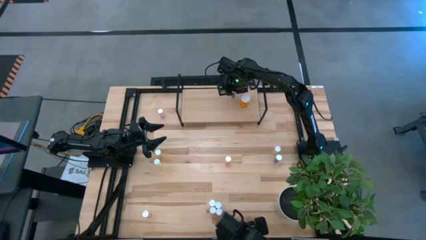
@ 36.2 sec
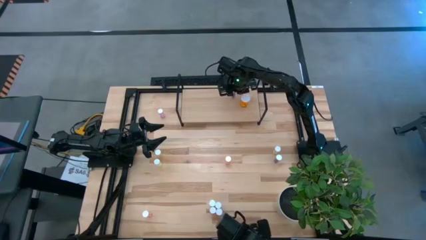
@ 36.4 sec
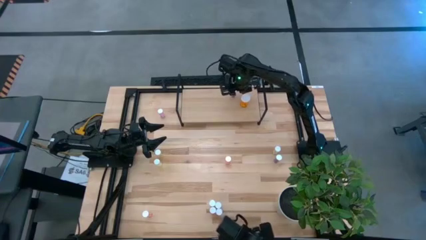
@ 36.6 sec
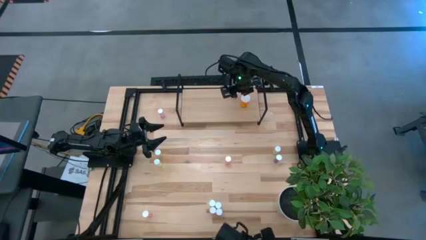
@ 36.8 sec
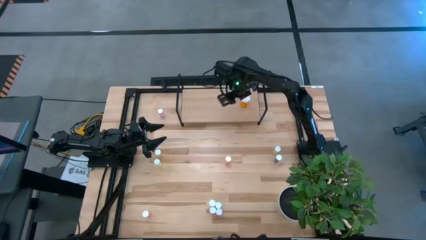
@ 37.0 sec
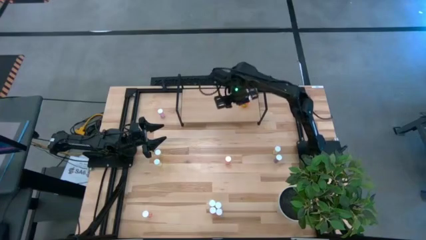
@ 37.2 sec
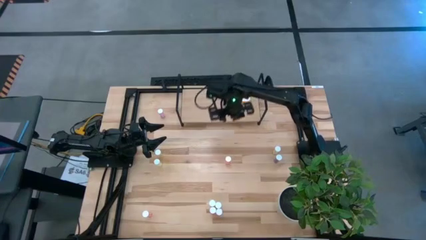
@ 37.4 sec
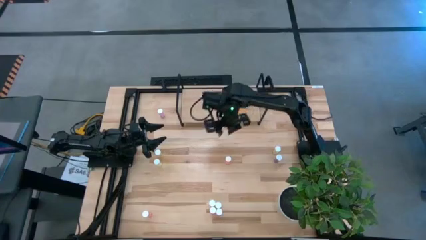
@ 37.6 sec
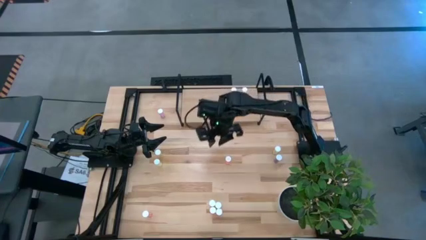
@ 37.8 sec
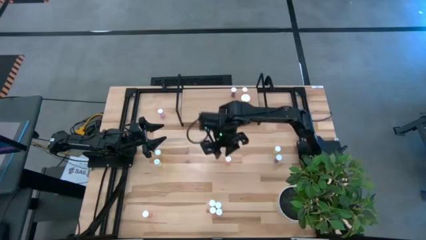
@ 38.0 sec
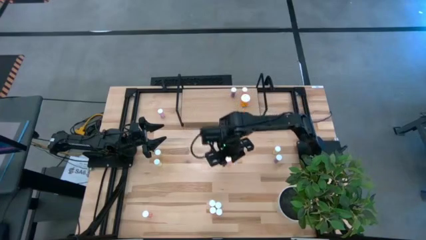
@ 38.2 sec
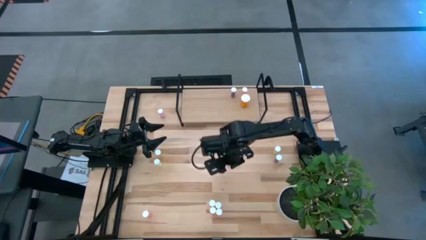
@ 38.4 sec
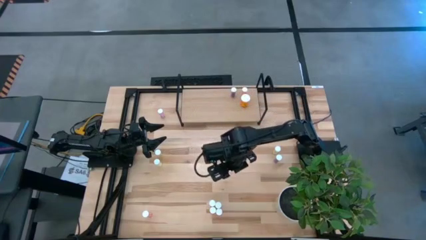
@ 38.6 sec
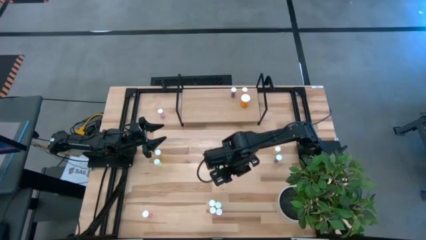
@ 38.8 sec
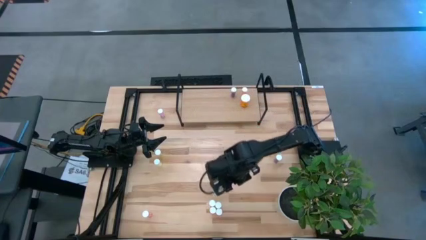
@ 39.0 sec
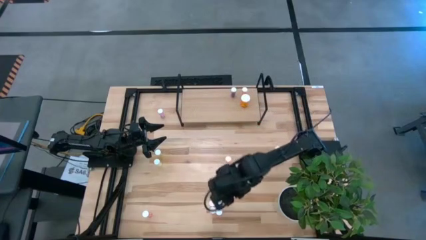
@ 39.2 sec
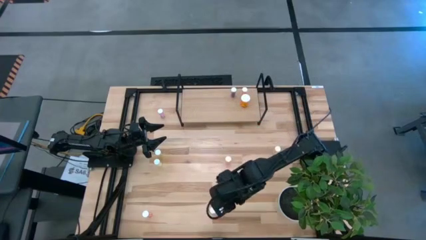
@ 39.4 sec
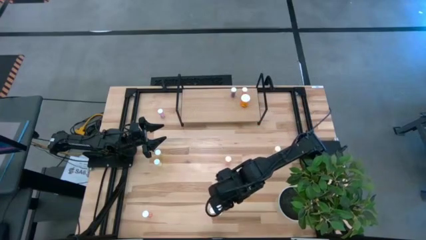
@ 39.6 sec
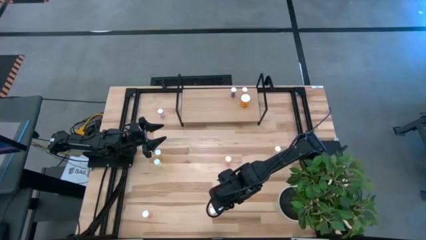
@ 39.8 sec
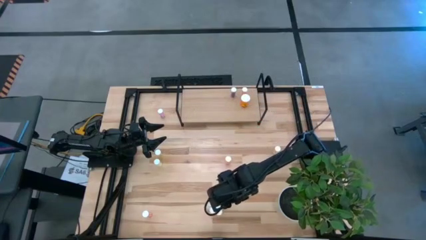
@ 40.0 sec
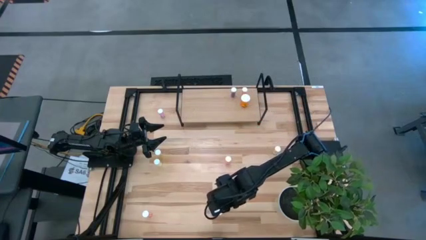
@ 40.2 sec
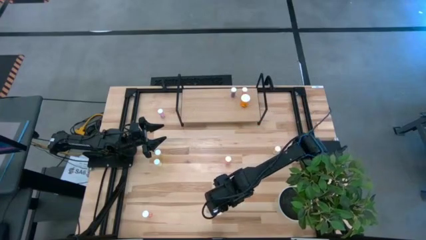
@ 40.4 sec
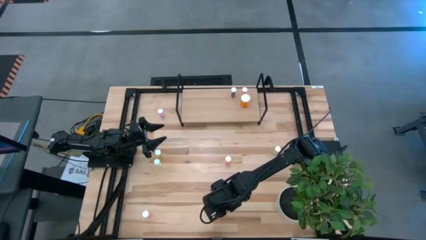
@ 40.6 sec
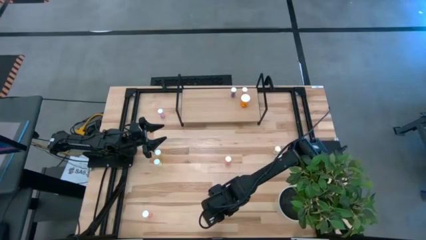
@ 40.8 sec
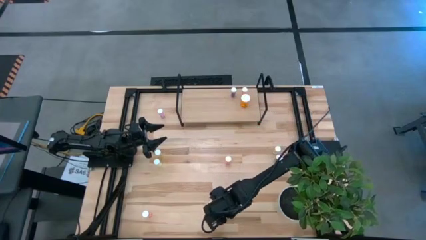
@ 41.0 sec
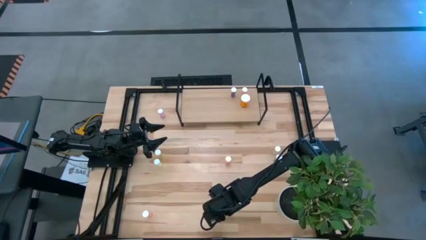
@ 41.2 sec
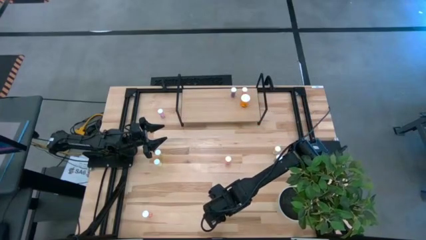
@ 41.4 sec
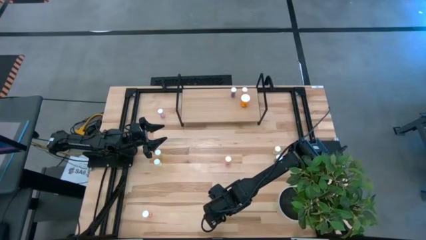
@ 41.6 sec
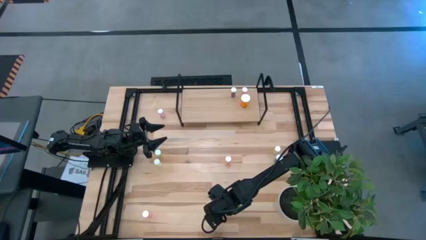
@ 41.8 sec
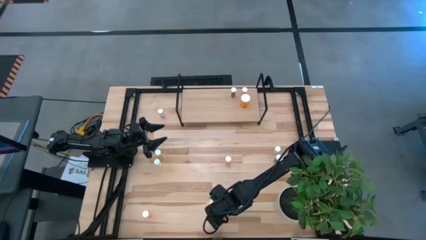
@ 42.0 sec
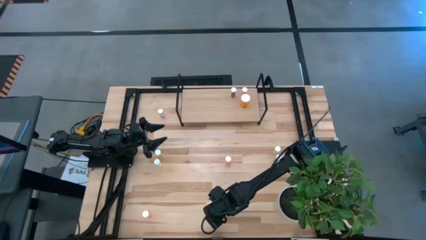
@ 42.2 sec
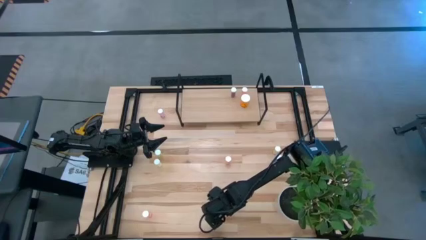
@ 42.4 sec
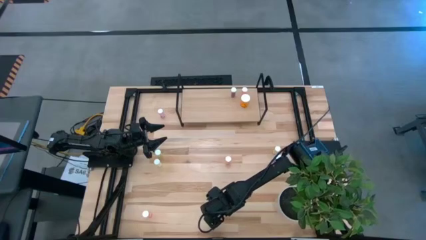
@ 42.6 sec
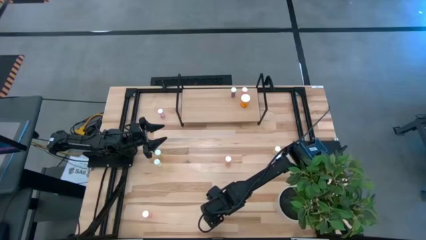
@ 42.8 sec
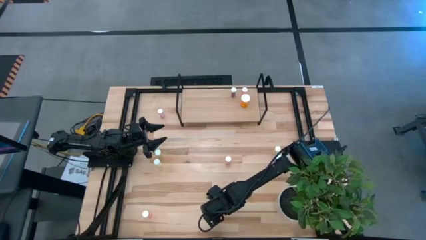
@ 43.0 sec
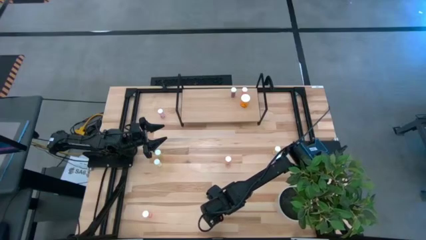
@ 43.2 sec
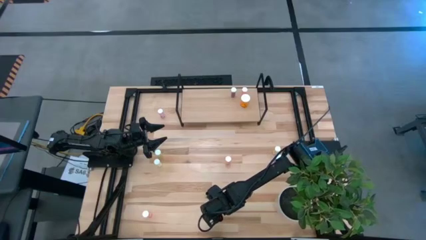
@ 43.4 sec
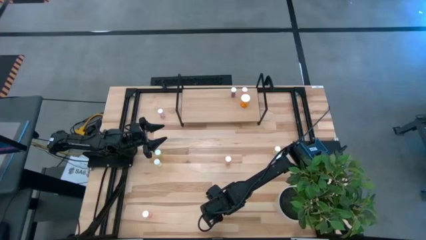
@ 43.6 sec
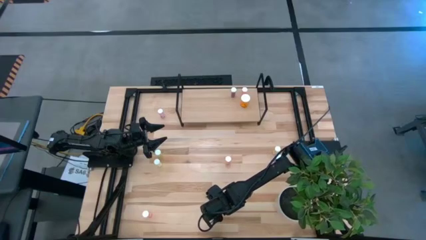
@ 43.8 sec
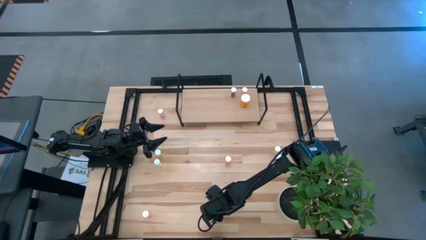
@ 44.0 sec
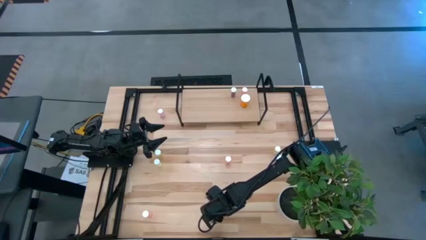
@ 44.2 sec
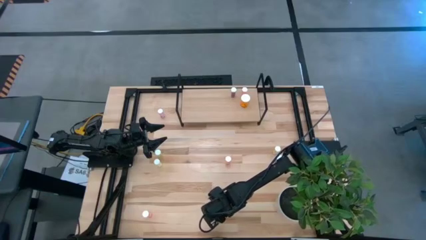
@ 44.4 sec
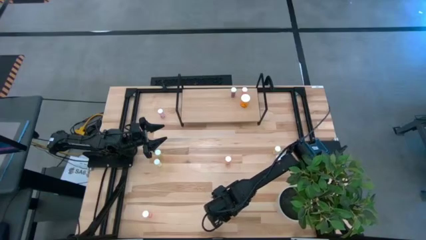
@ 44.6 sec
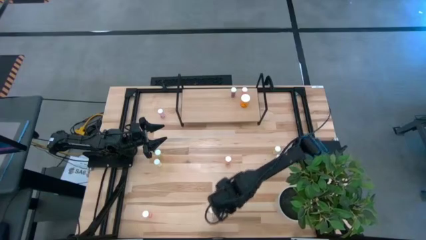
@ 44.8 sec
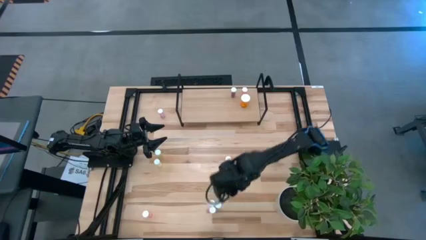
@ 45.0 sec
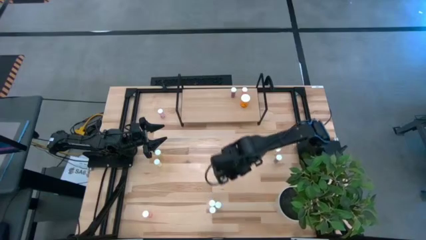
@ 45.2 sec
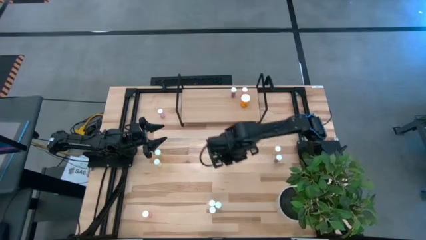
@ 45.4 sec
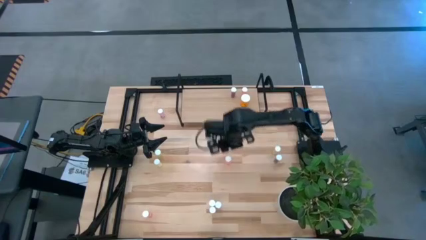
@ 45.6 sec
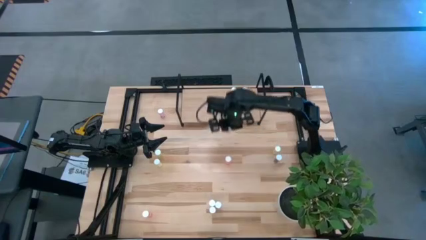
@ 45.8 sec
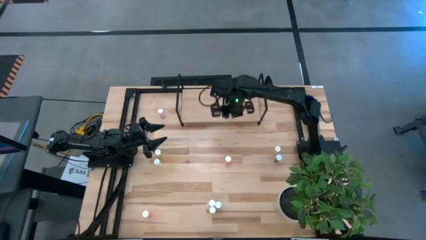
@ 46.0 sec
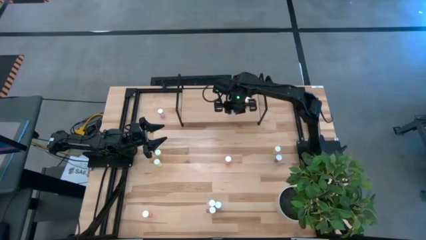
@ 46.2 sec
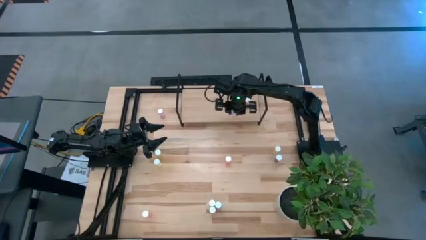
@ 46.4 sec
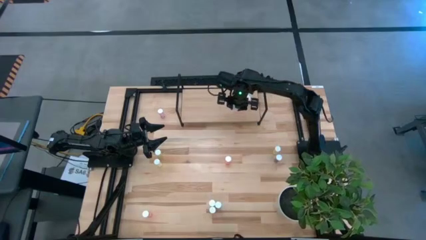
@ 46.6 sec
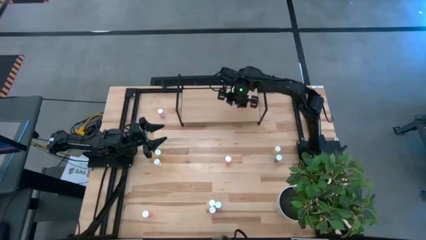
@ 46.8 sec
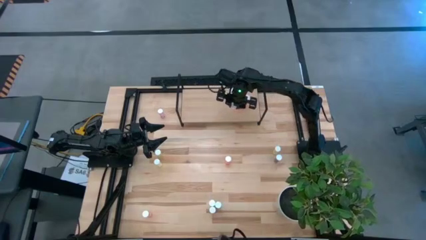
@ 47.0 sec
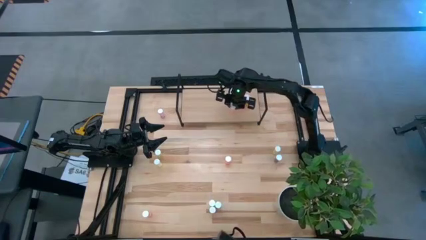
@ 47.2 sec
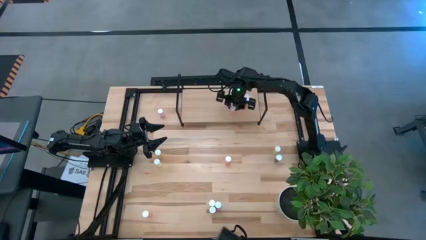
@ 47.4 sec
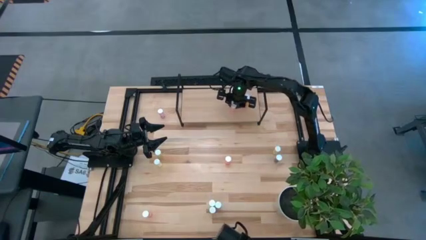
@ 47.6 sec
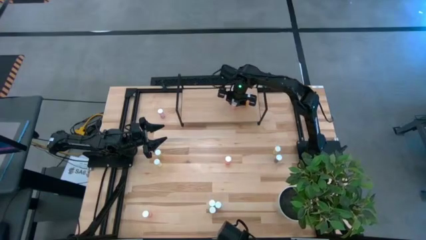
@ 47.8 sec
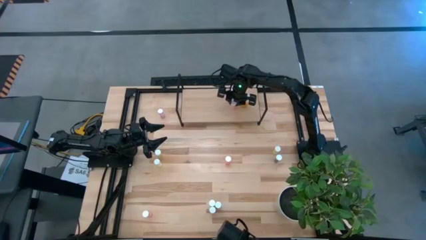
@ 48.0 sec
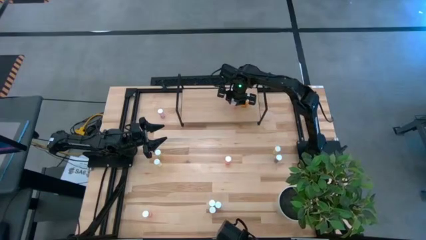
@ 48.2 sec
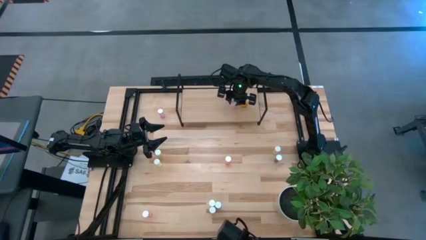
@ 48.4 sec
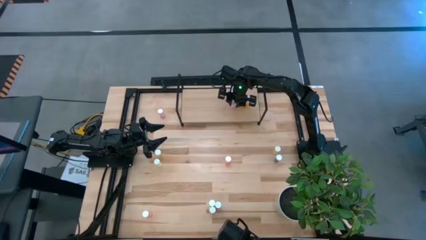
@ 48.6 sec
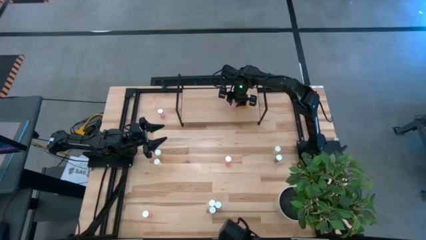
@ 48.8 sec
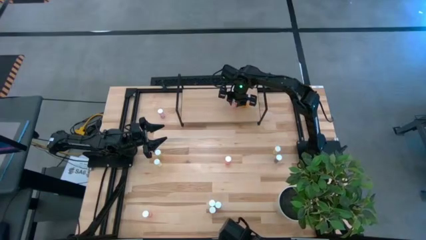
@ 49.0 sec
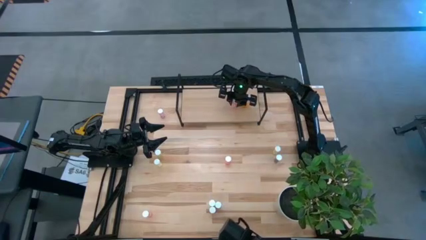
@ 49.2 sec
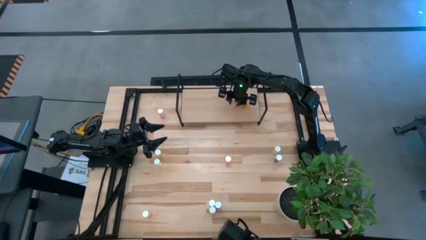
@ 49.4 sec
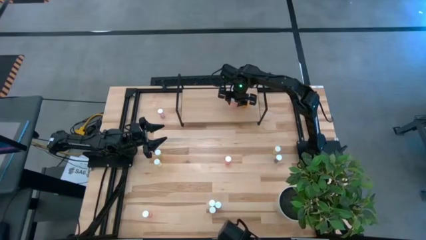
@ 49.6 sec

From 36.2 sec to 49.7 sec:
Task: Pick and place medicine bottles onto shelf by color
Put the pink pill bottle on the shelf

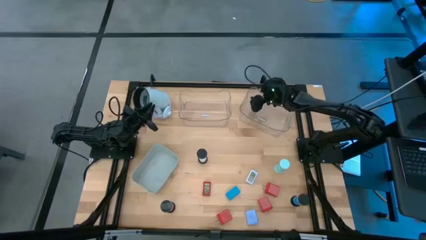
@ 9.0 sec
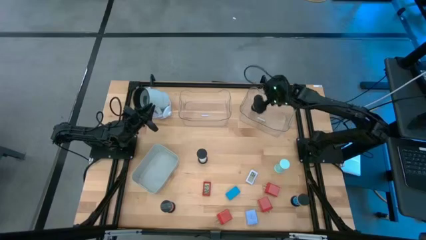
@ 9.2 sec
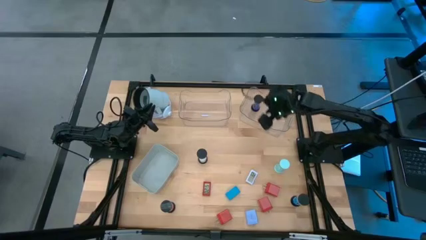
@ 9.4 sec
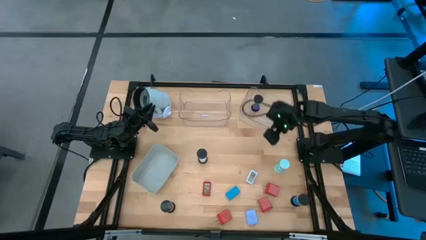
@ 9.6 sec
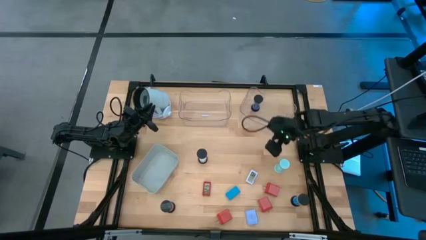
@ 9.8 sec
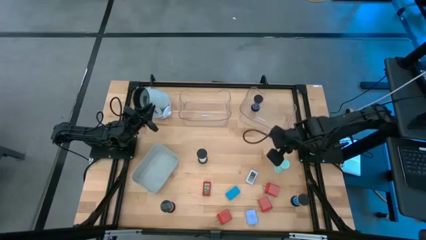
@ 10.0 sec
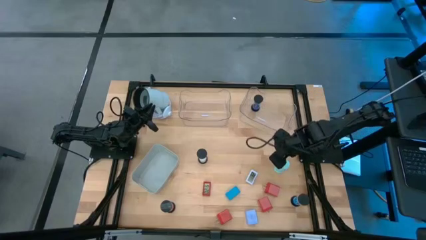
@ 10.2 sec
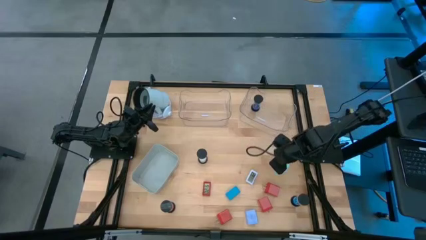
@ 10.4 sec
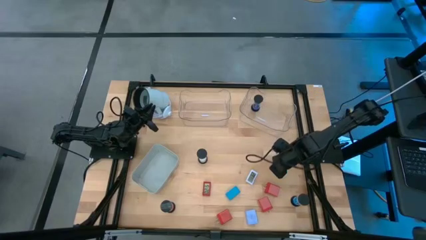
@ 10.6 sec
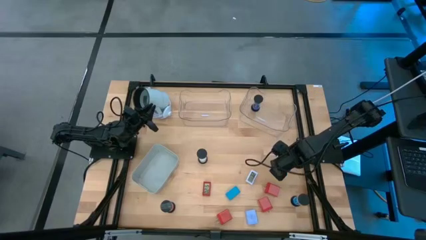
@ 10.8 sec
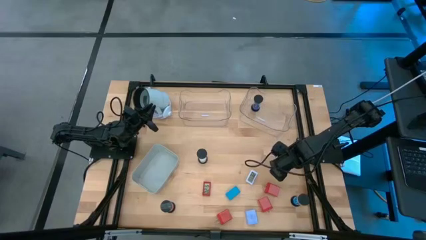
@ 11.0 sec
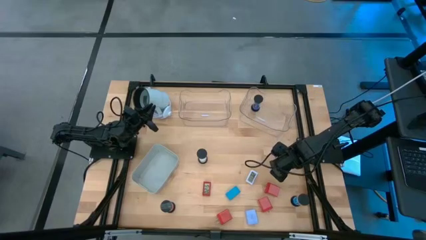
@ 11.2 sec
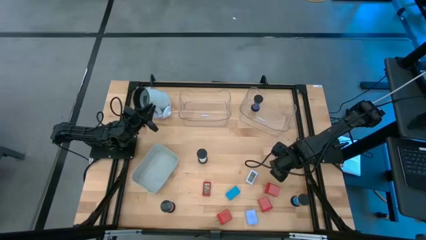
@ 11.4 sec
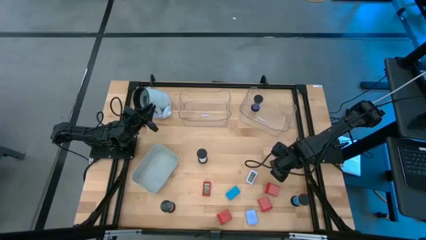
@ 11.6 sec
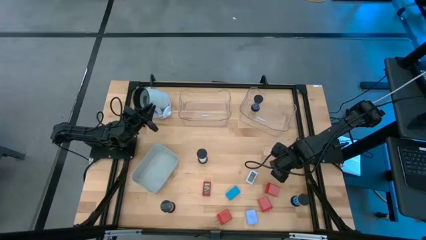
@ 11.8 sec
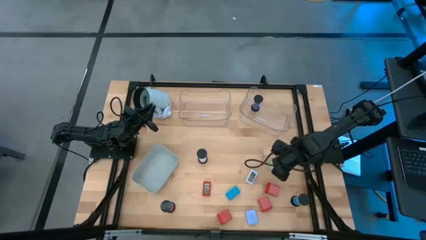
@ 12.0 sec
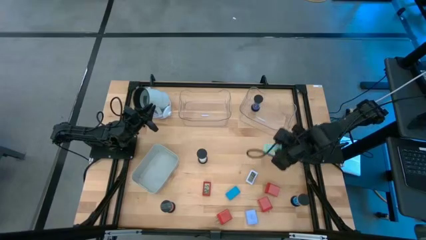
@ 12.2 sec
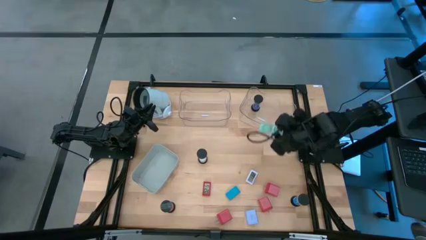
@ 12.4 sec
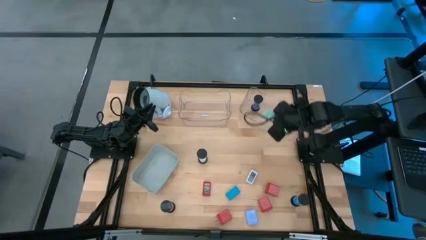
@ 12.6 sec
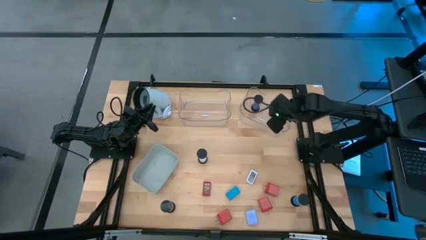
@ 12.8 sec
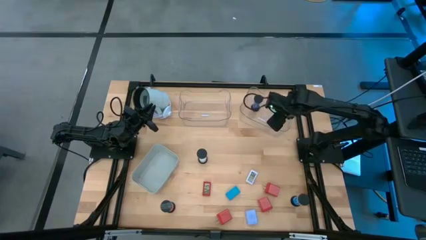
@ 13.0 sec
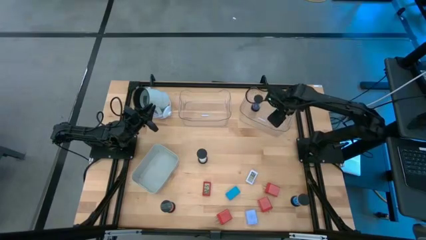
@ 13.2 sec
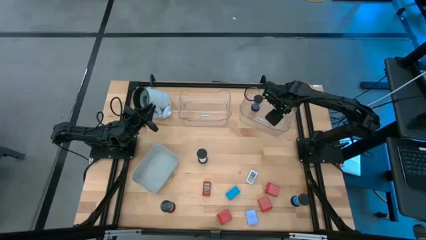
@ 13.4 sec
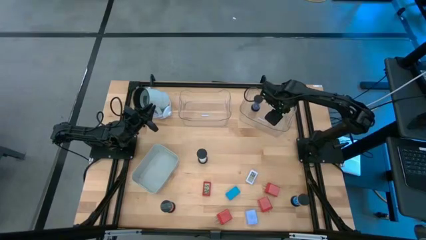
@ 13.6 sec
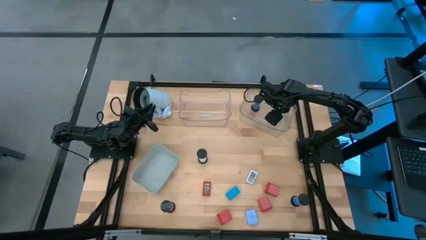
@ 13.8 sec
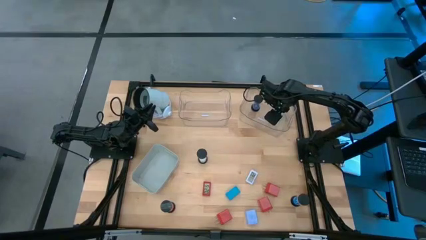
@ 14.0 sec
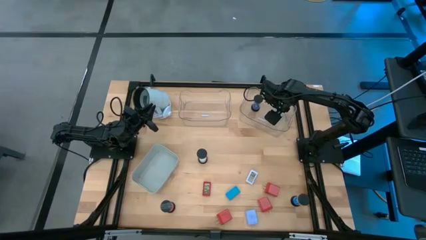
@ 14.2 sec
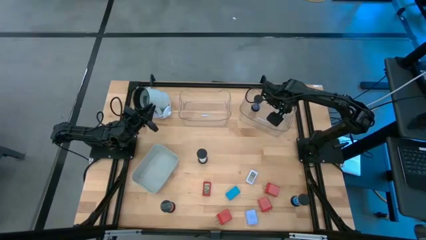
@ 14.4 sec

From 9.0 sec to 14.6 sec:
Task: Pick & Place Office items
Put the light green hourglass into the right transparent bin
